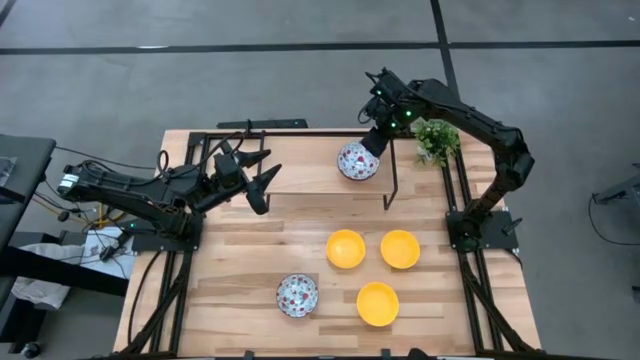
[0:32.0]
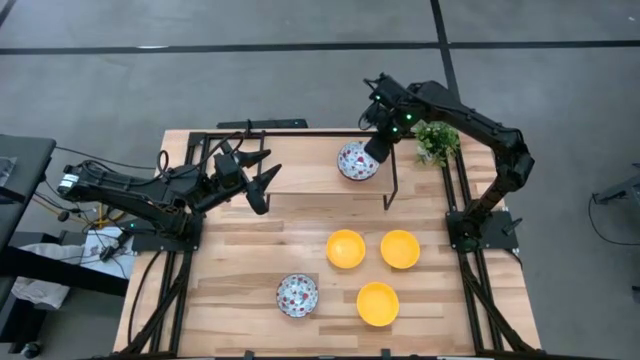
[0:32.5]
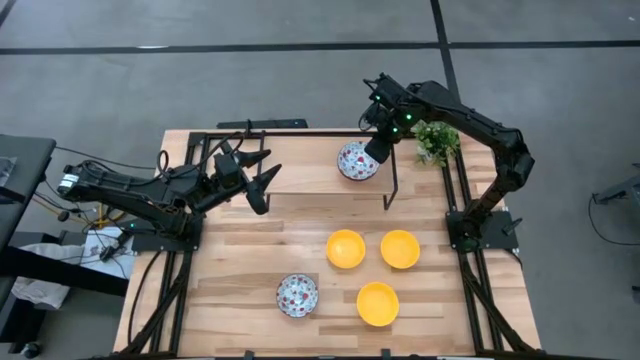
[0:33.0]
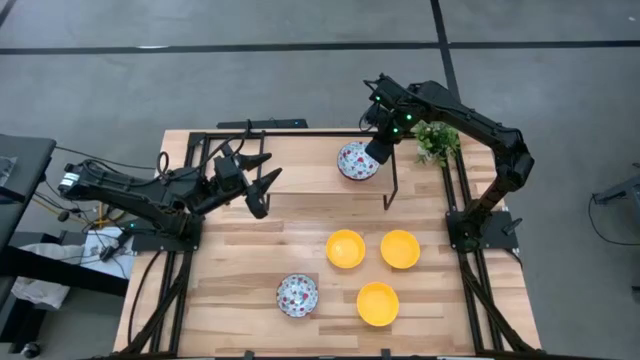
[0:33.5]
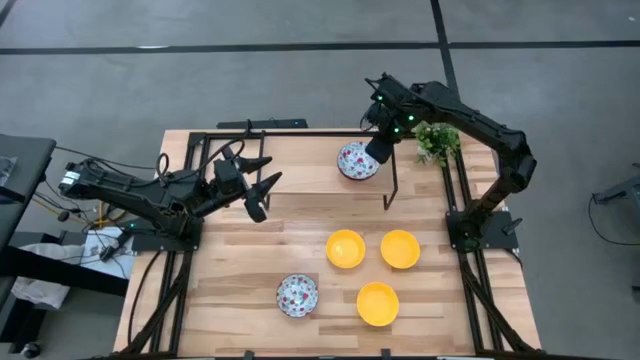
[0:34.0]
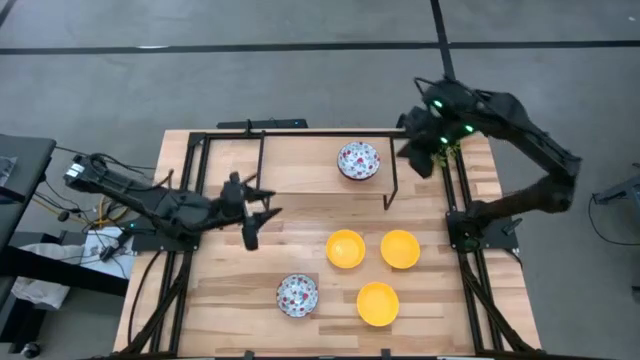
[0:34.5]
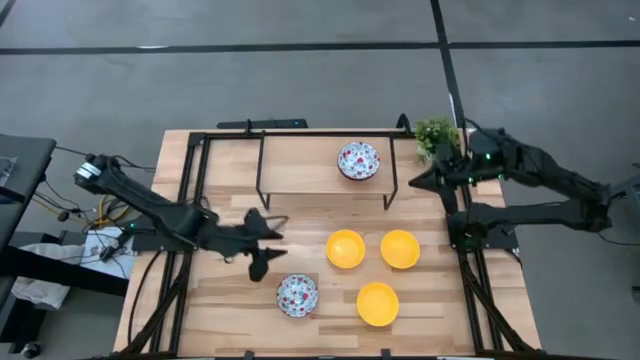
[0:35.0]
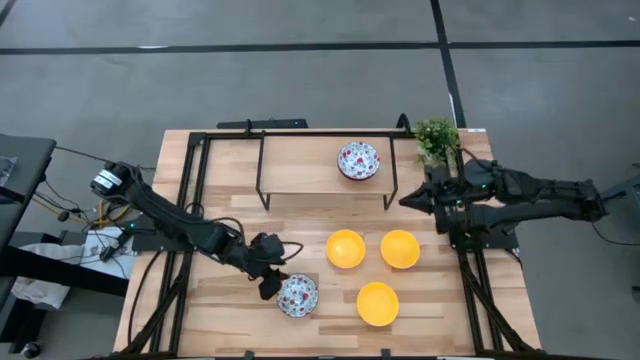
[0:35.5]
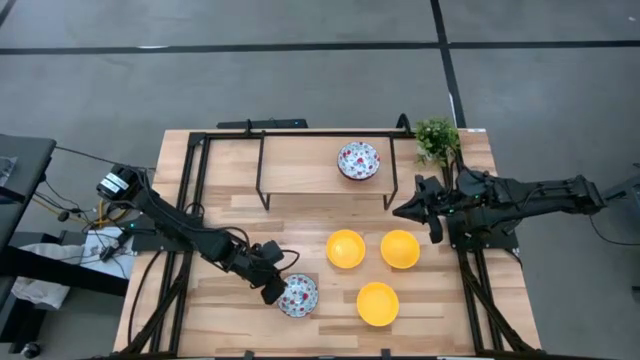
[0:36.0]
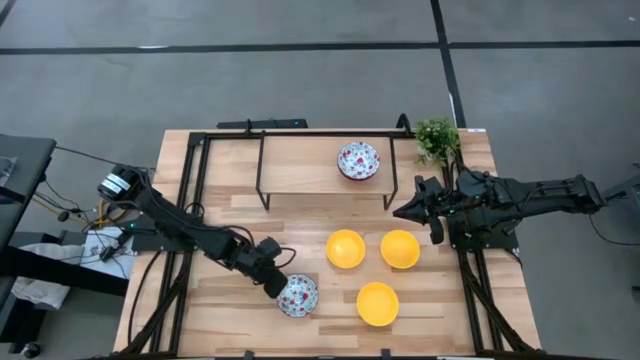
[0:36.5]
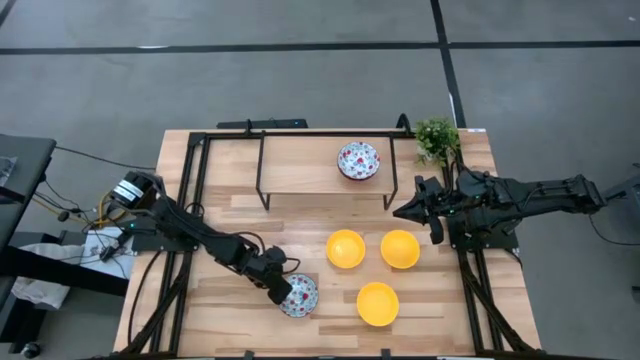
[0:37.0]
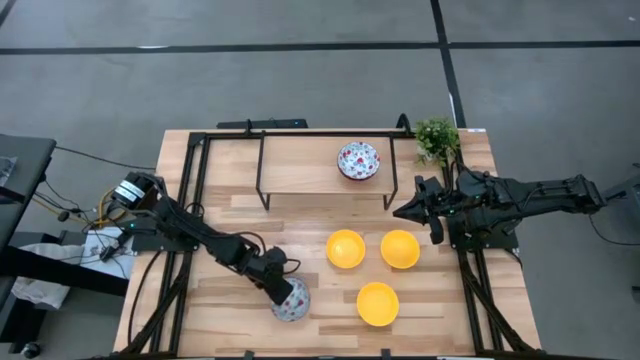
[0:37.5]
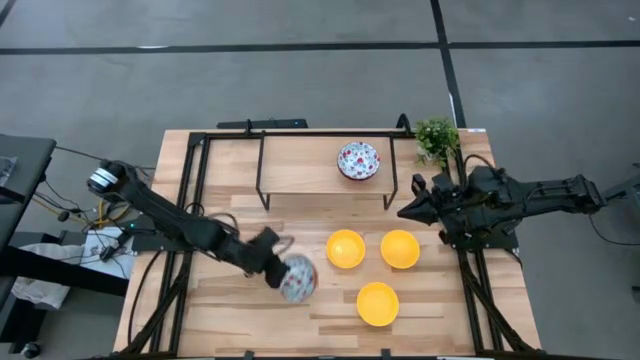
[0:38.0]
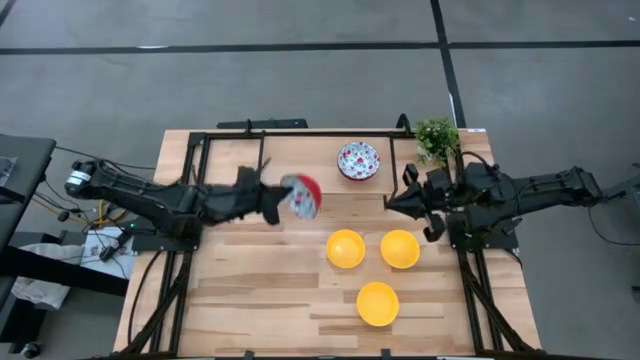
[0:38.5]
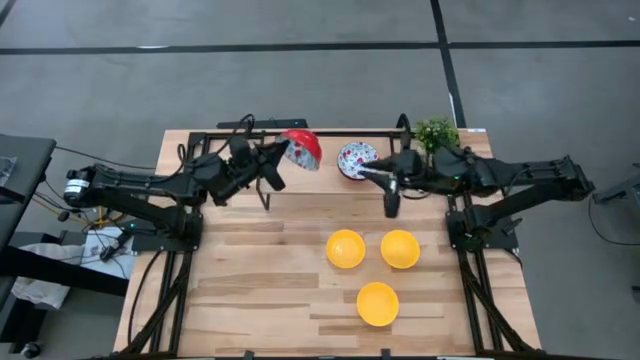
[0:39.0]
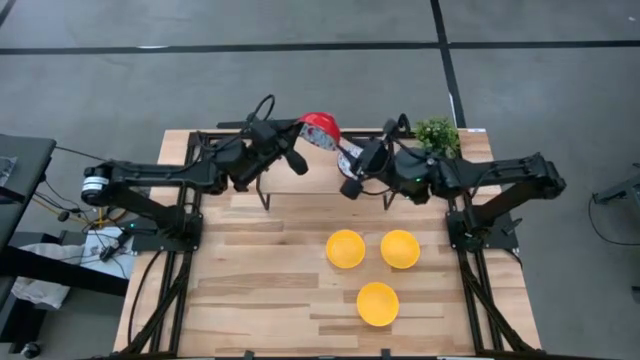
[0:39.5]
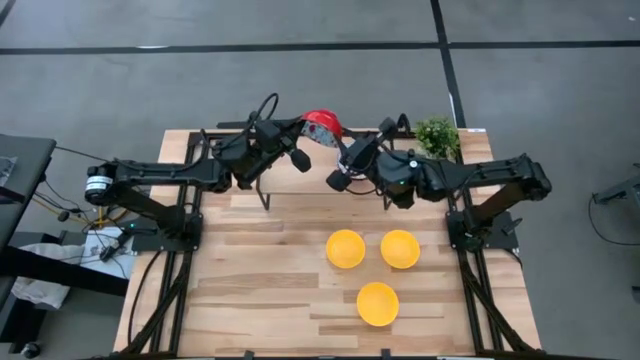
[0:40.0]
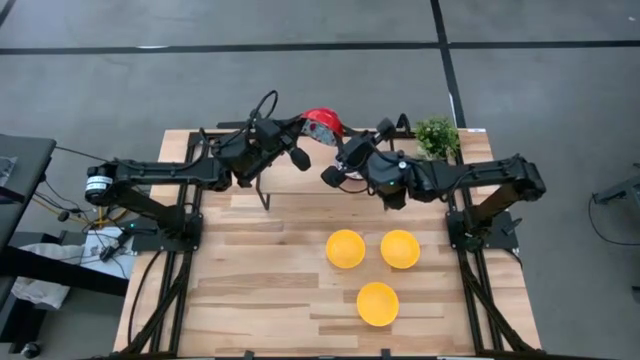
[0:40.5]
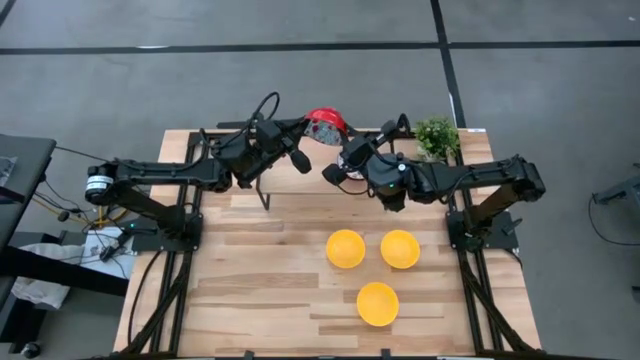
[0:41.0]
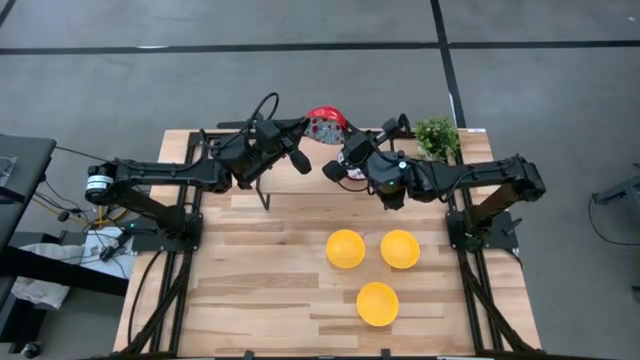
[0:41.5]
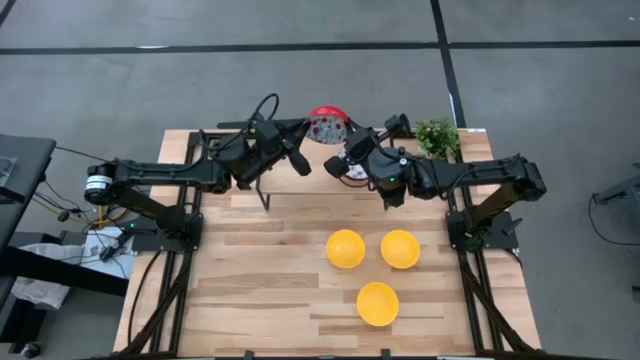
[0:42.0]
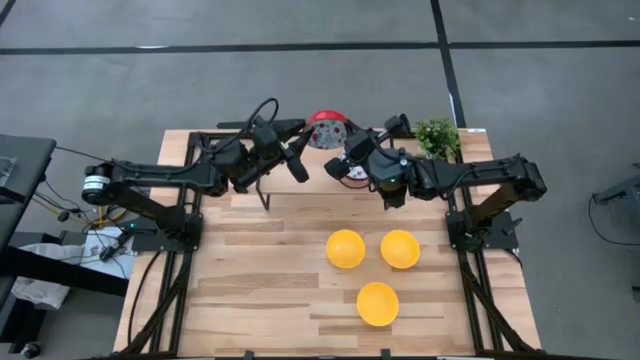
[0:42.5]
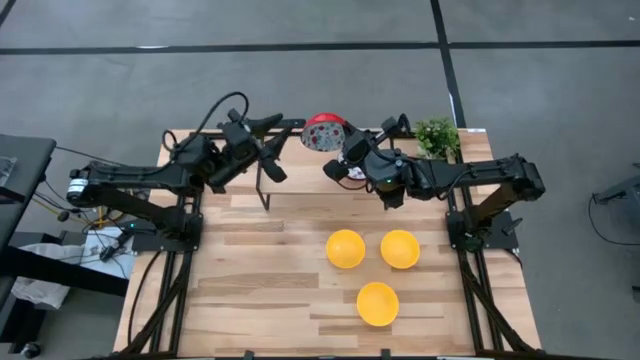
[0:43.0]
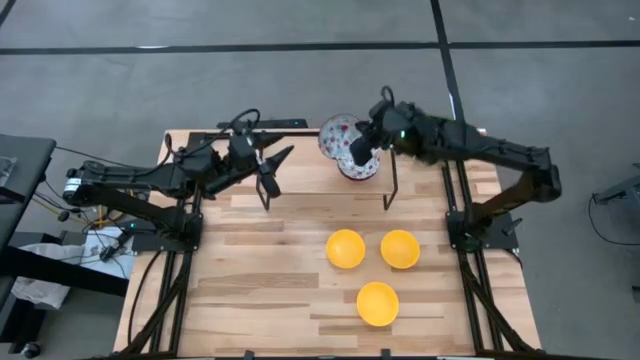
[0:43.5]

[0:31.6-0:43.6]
Task: Pick & Place Mini bowls
Stack the red patterned bowl on the red patterned bowl on the shelf

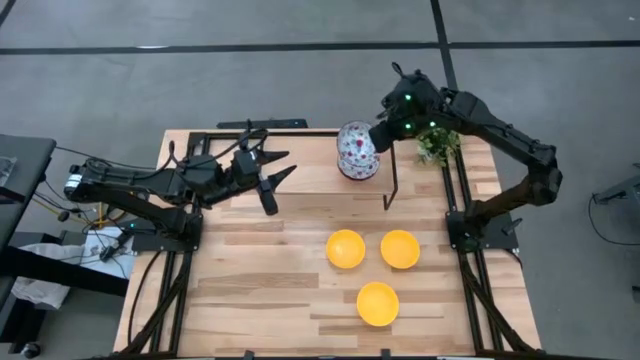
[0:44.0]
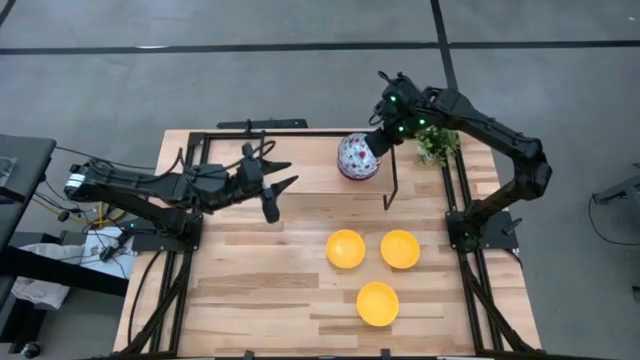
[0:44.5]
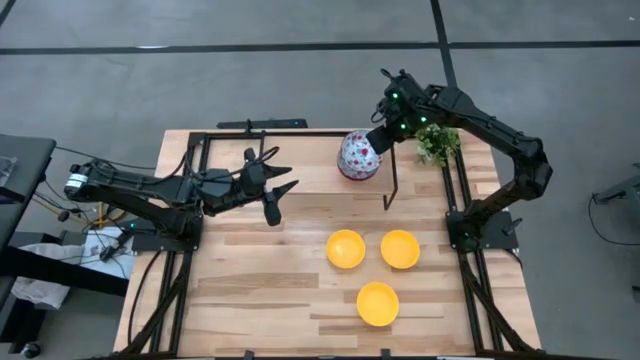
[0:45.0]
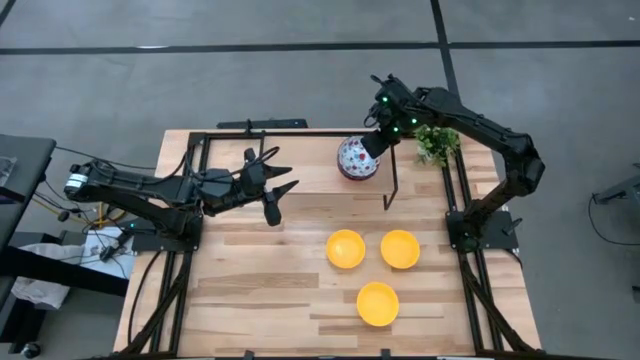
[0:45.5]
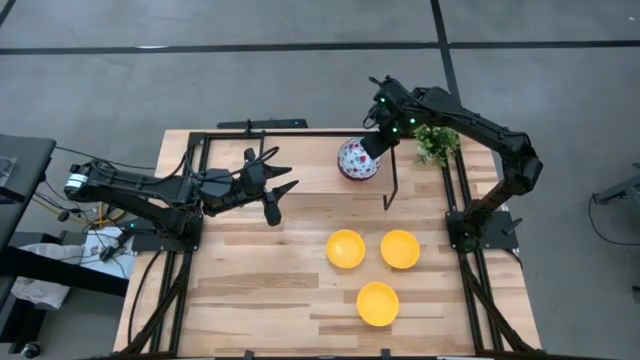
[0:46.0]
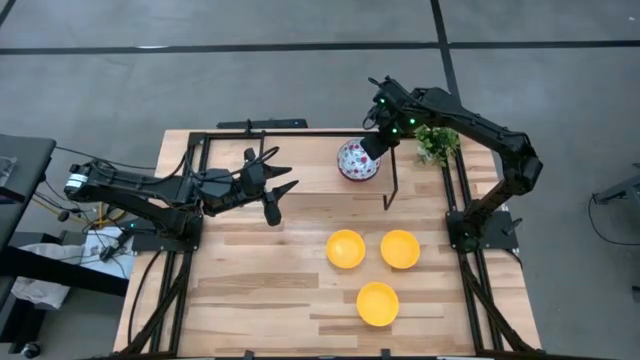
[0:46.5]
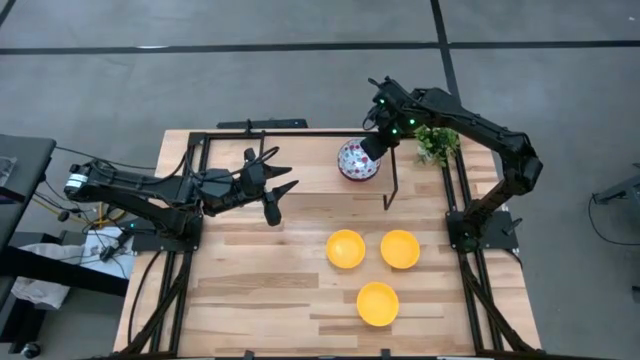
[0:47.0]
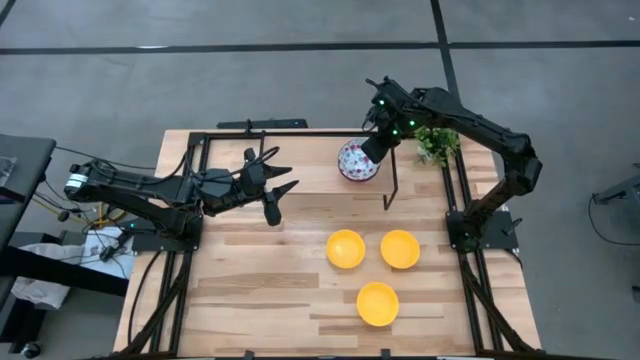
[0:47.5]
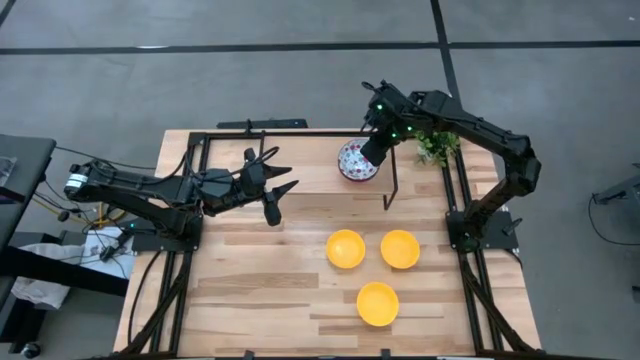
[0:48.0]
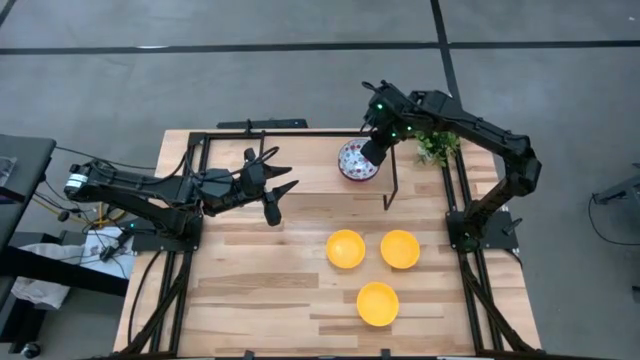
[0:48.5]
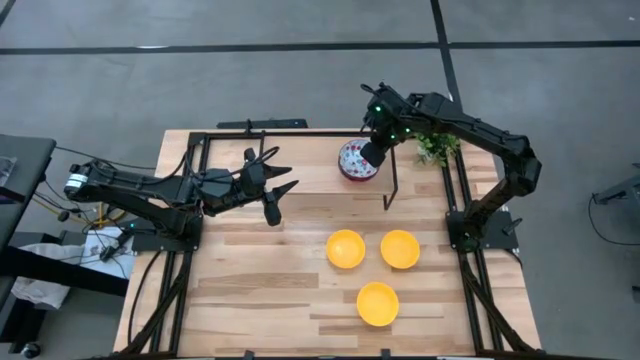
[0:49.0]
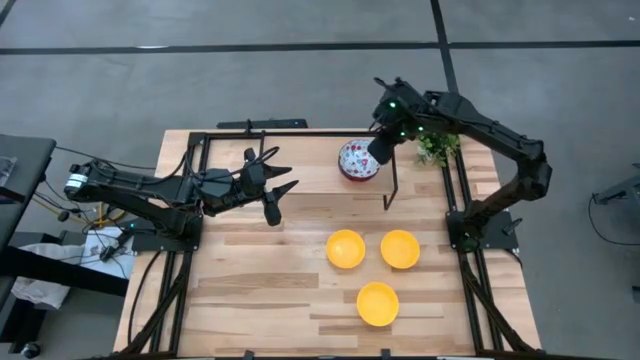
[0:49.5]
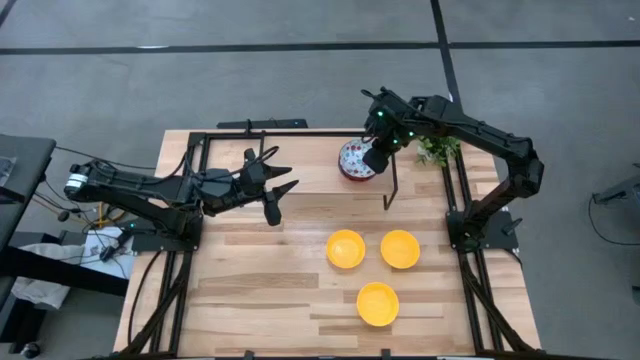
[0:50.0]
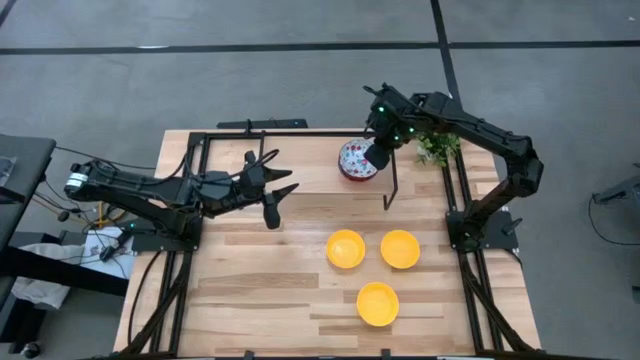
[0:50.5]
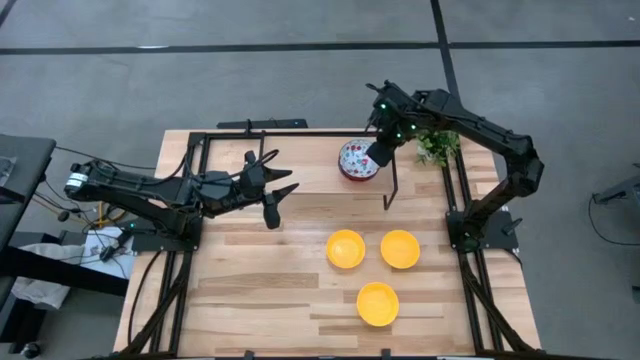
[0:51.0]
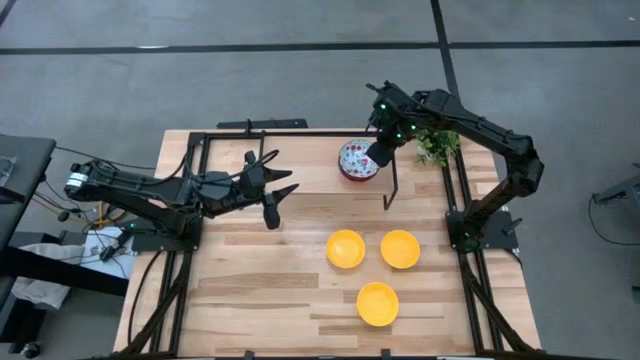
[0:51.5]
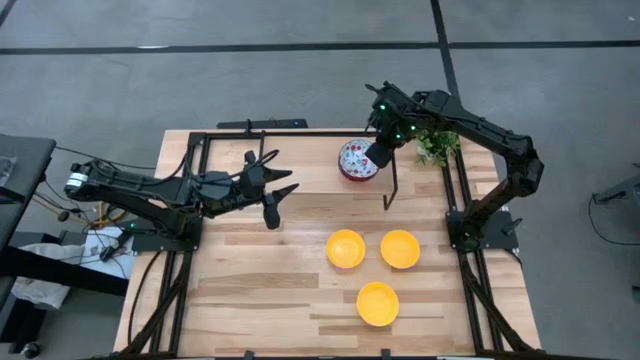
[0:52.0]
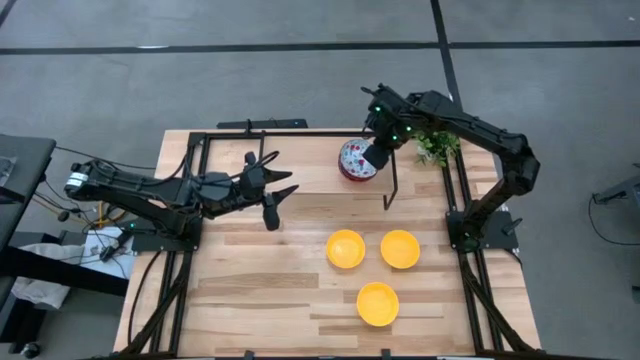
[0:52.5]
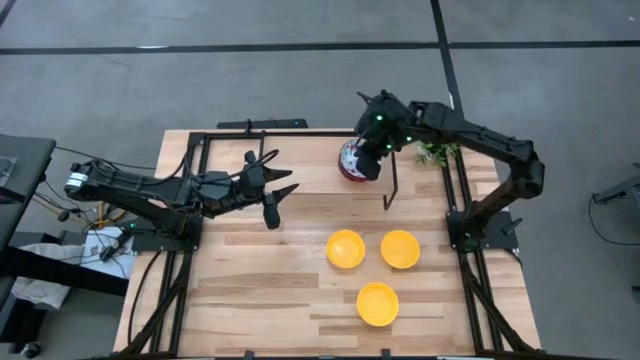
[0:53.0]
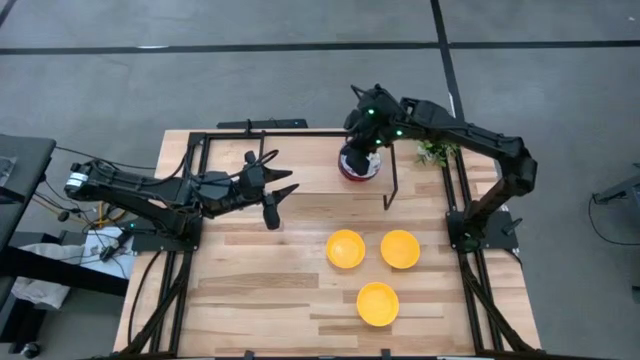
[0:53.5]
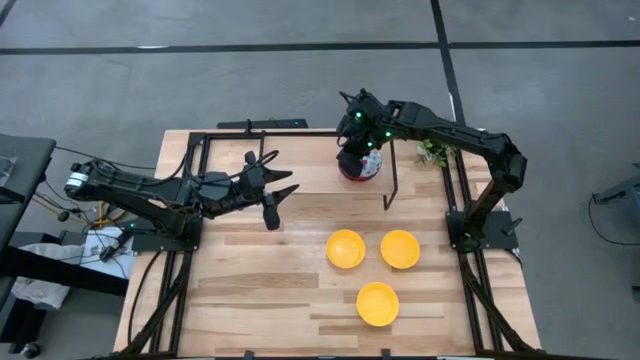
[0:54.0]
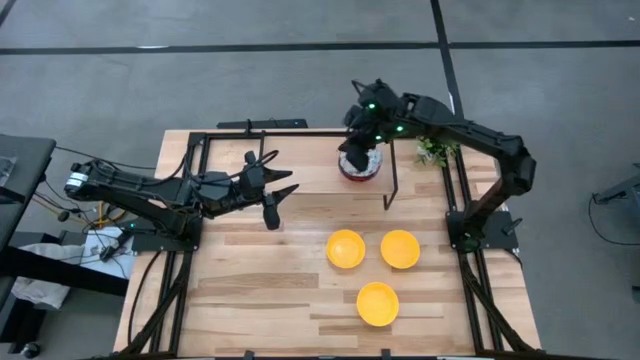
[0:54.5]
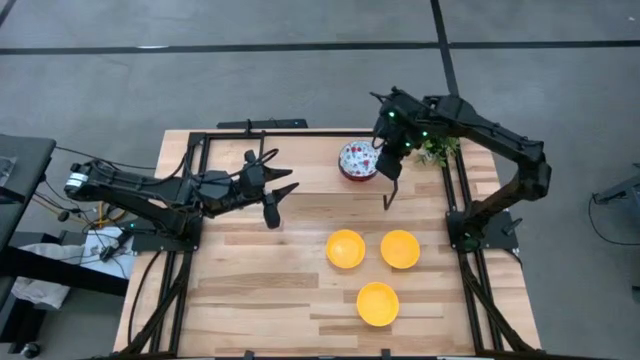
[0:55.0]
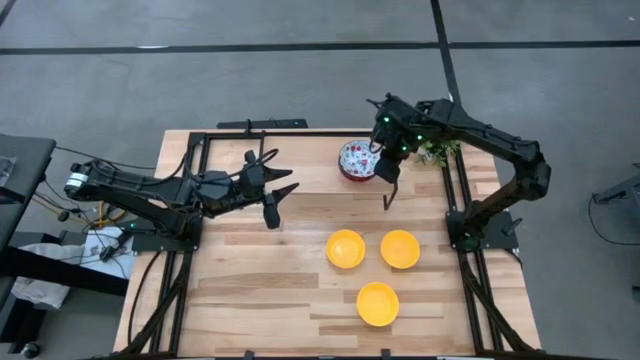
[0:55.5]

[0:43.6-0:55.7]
Stack the red patterned bowl on the red patterned bowl on the shelf
